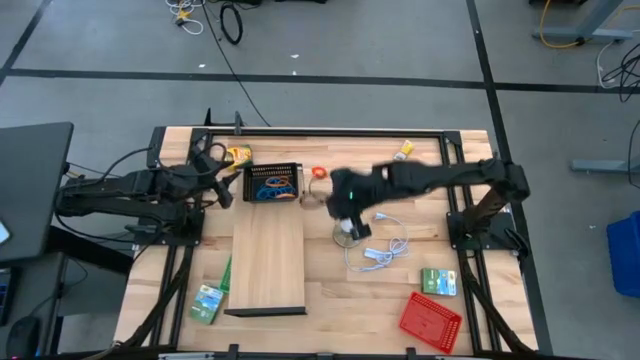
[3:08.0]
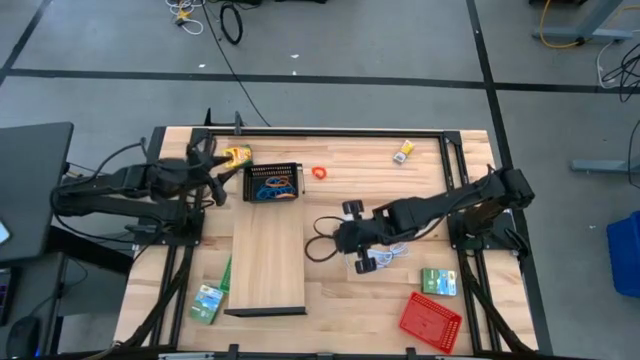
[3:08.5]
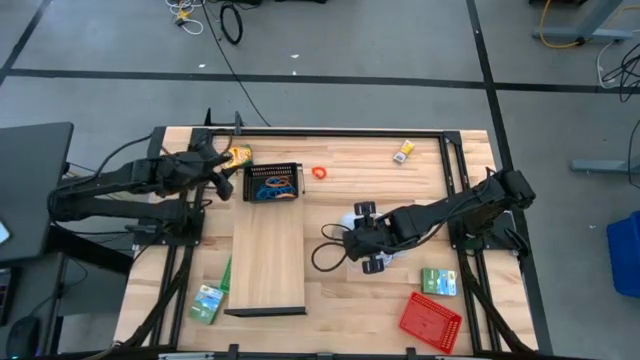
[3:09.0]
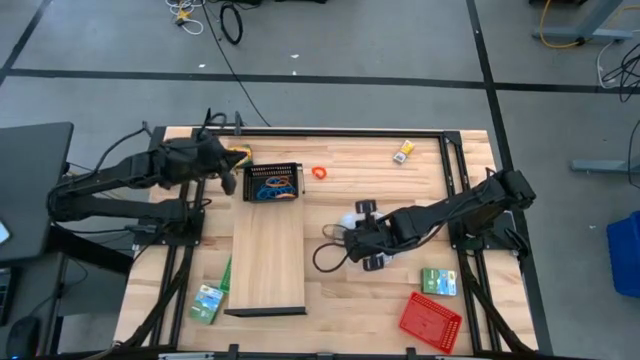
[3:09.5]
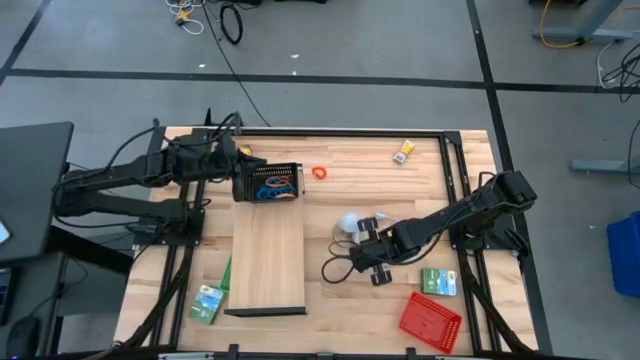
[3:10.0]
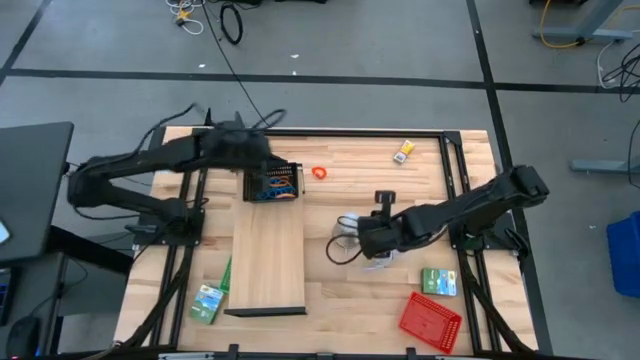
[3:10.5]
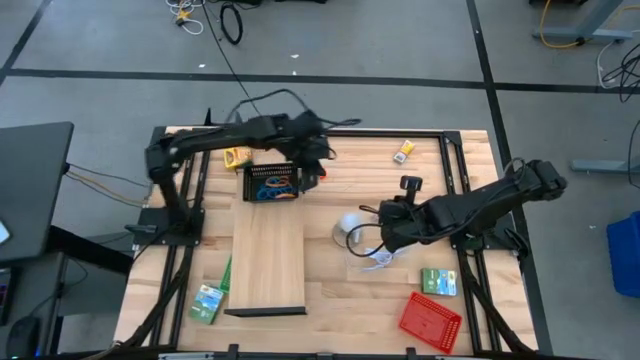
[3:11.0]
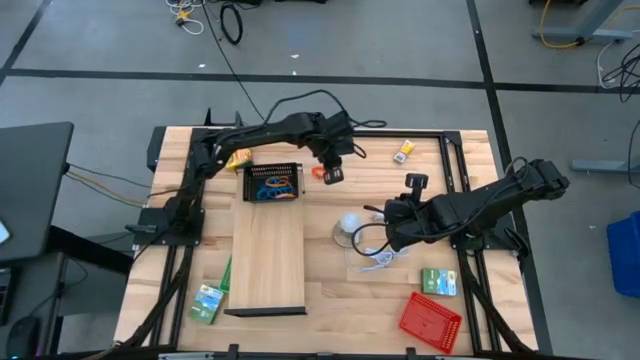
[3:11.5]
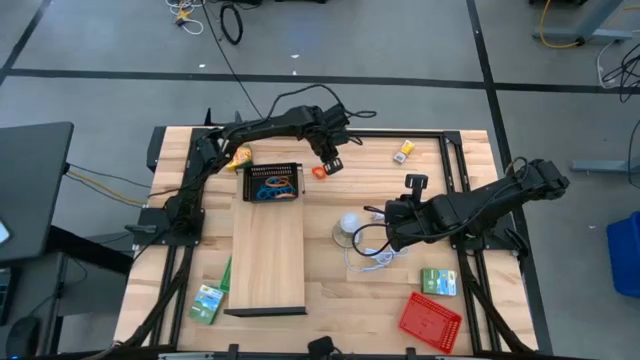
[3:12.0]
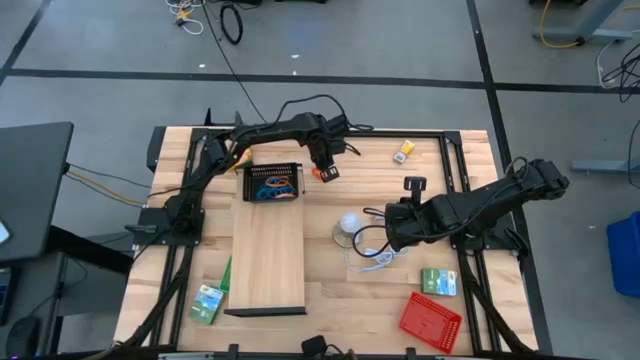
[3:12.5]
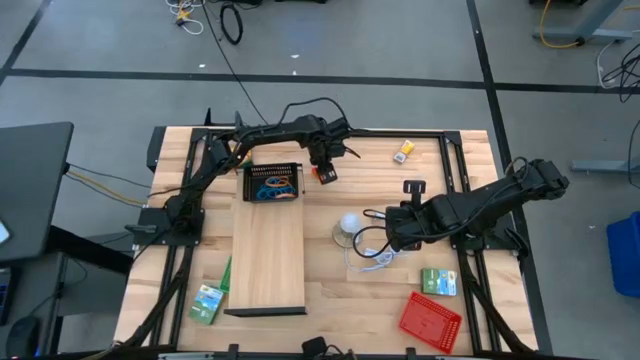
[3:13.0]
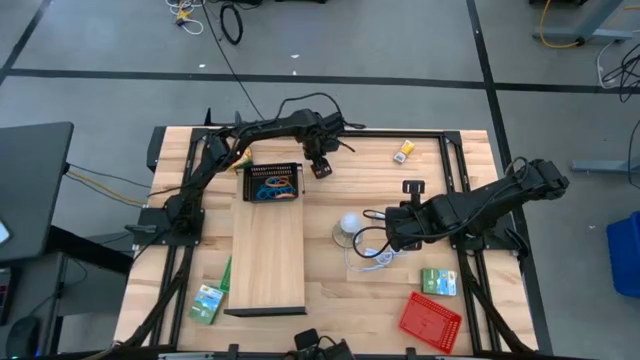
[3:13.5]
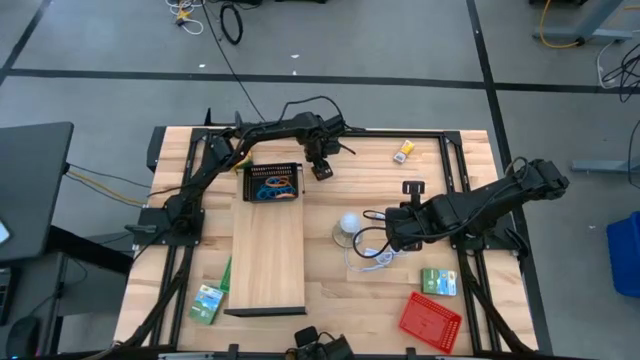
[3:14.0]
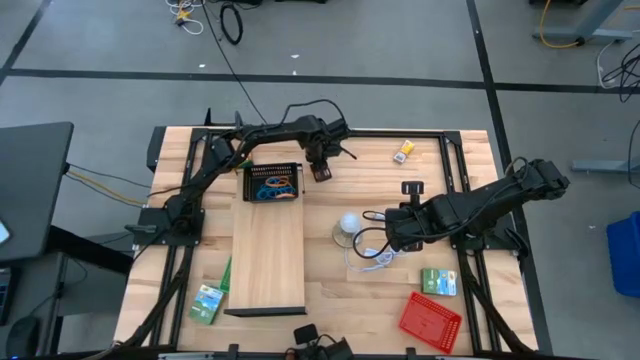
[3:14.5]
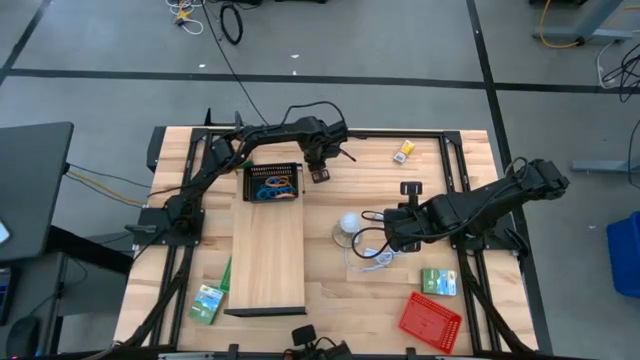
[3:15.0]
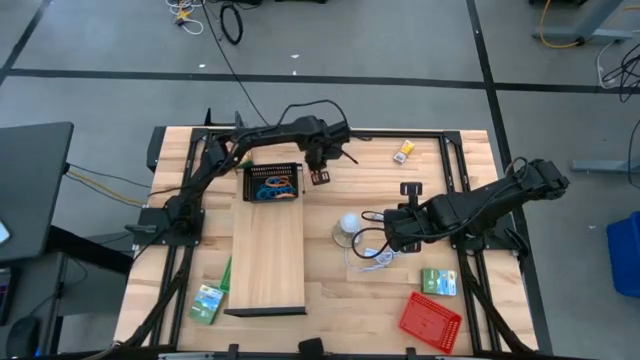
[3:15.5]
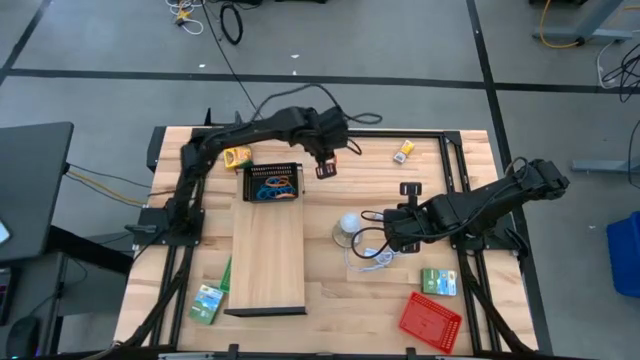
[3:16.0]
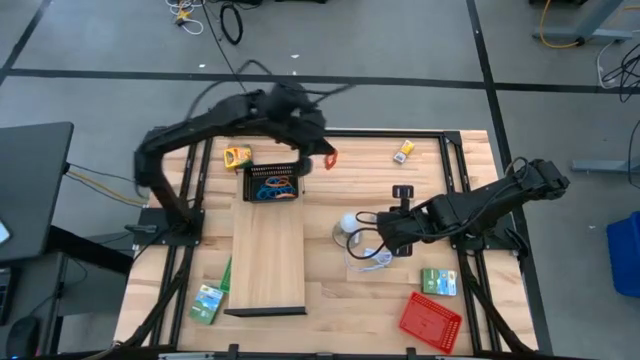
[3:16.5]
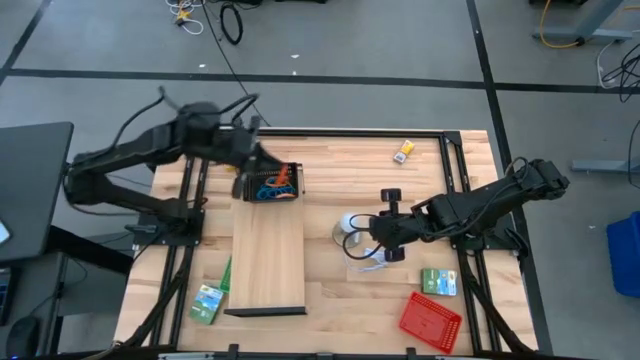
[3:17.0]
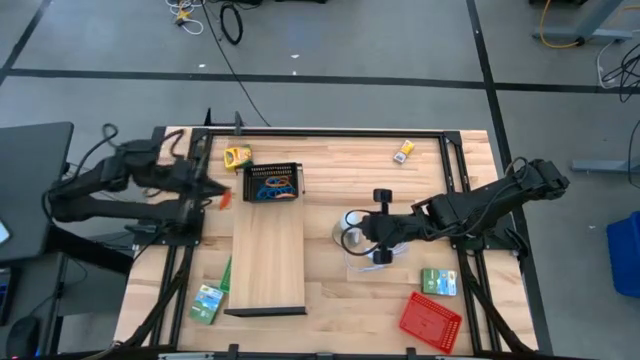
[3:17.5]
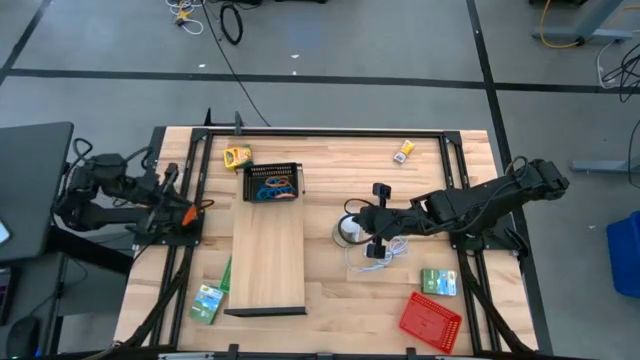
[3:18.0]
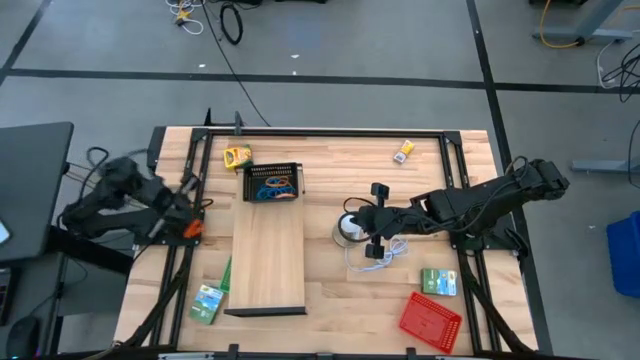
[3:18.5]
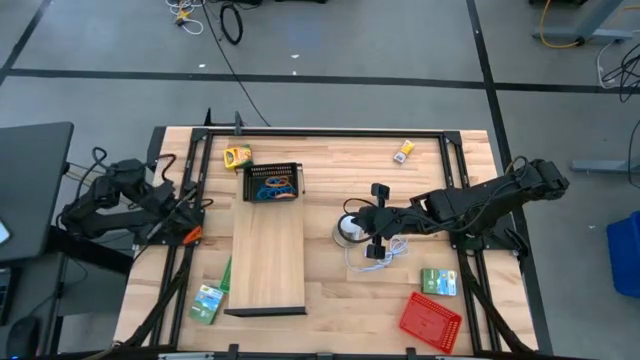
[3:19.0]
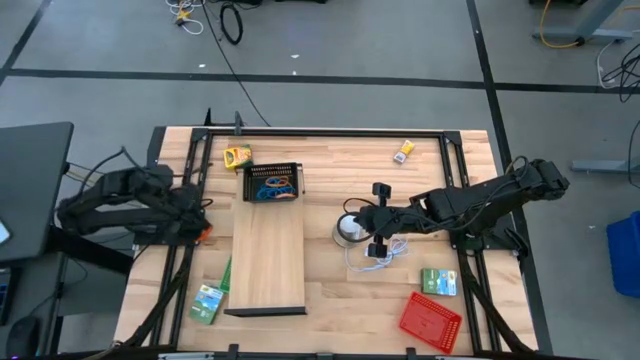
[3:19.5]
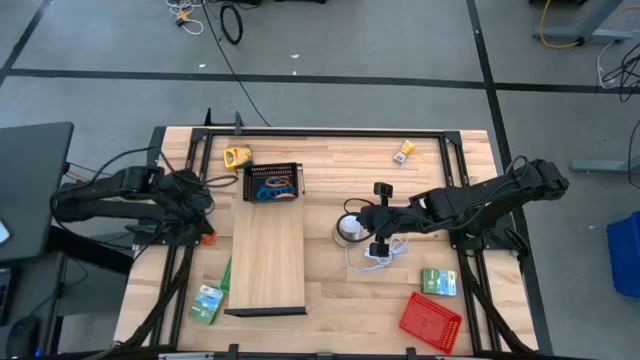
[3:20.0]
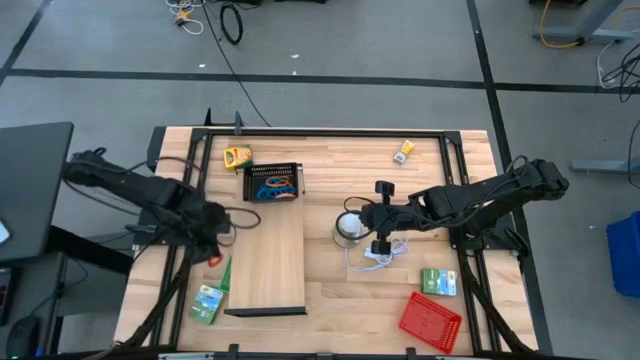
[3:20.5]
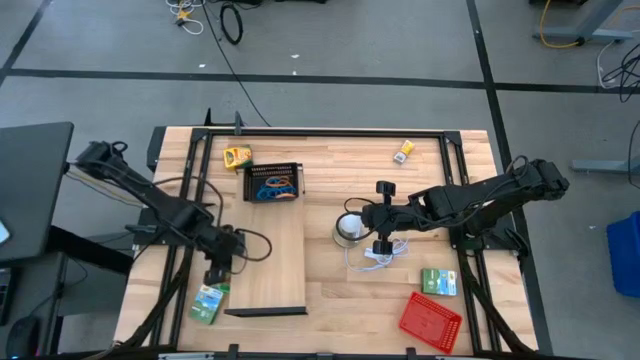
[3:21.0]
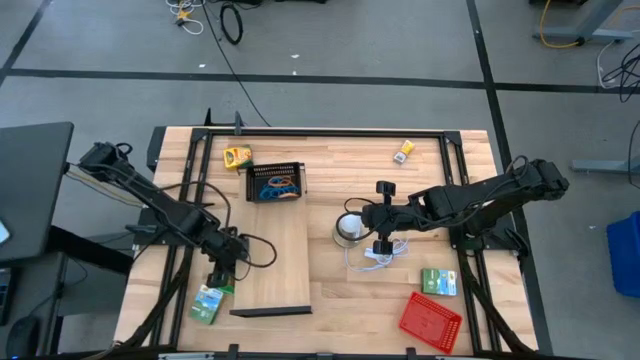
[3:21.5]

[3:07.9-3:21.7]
Task: Pick & Place Office Desk Supplies
Put the orange spiral keychain into the green bin

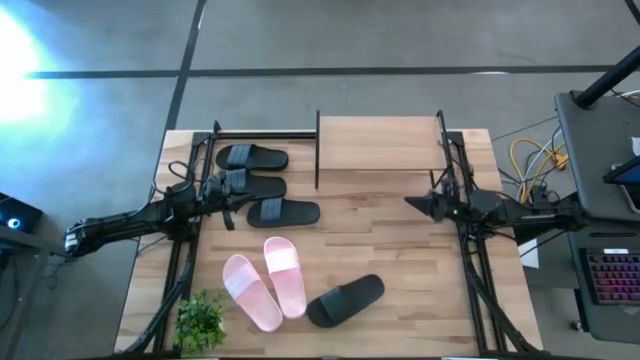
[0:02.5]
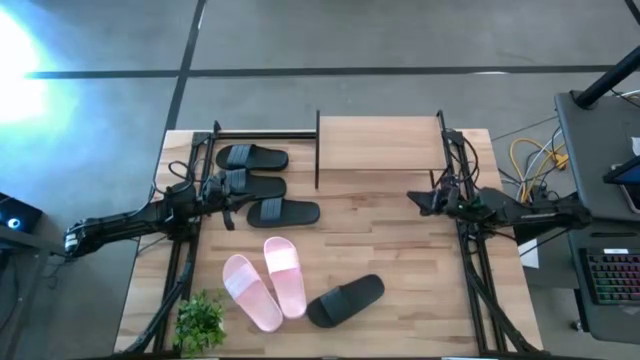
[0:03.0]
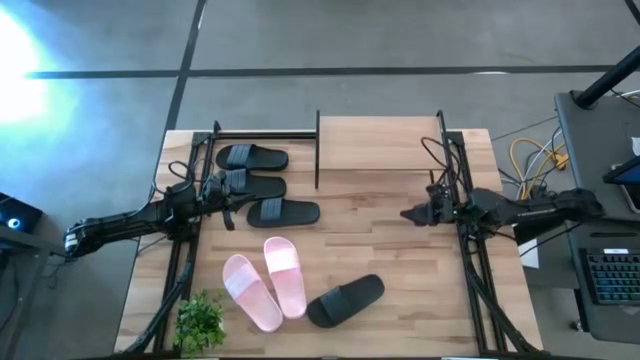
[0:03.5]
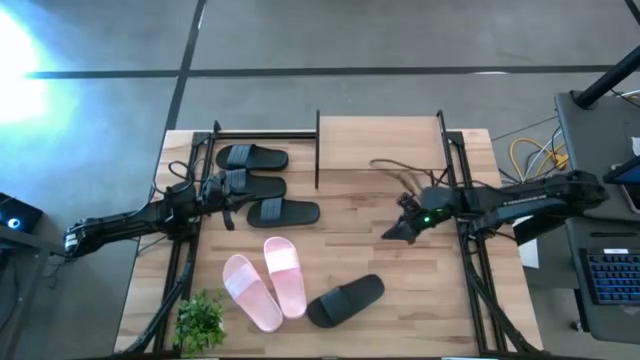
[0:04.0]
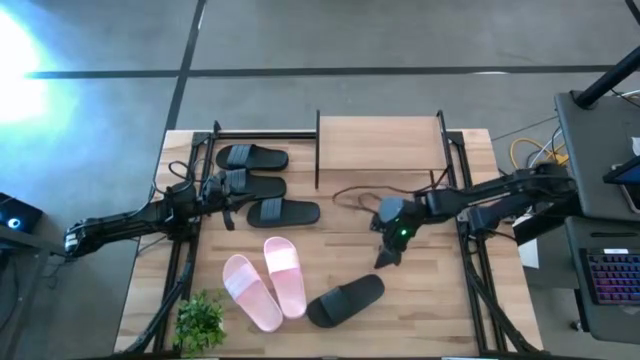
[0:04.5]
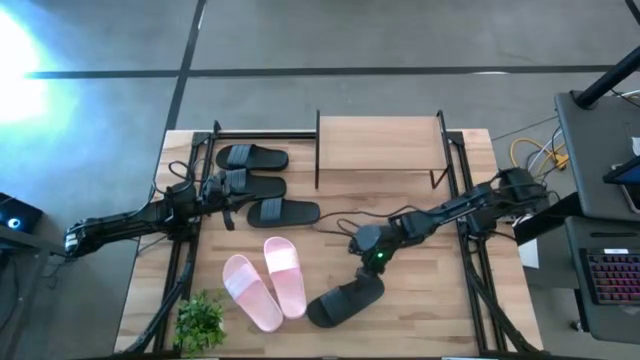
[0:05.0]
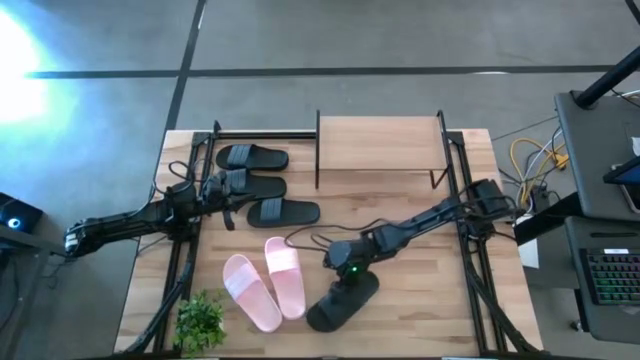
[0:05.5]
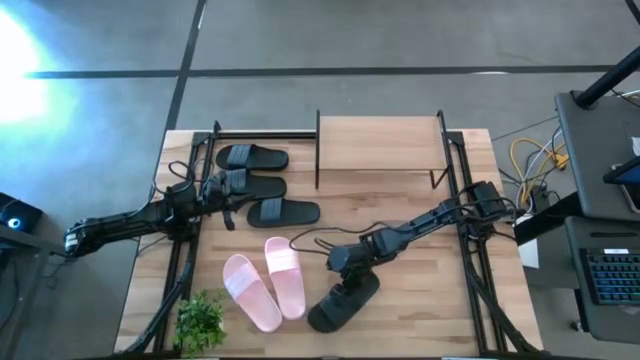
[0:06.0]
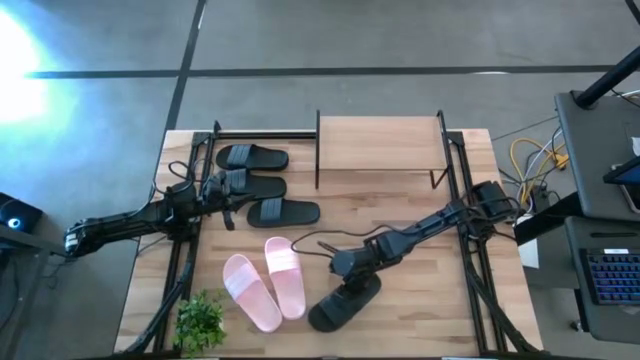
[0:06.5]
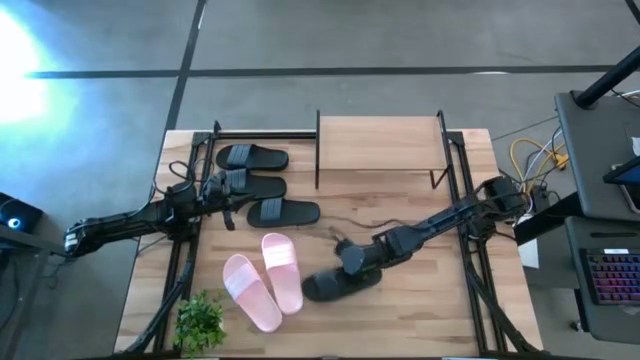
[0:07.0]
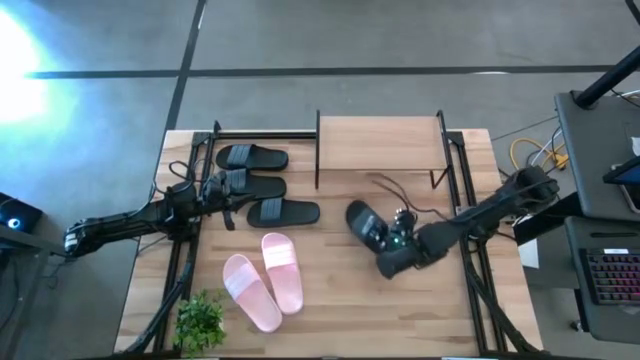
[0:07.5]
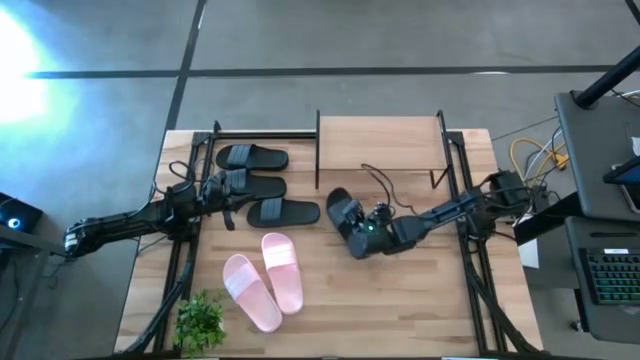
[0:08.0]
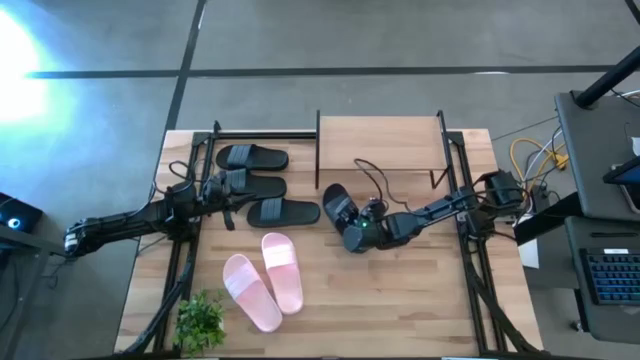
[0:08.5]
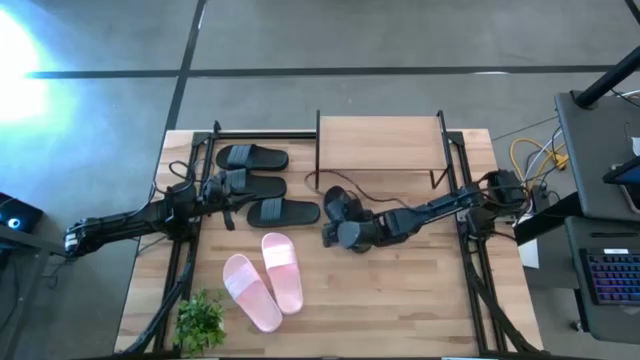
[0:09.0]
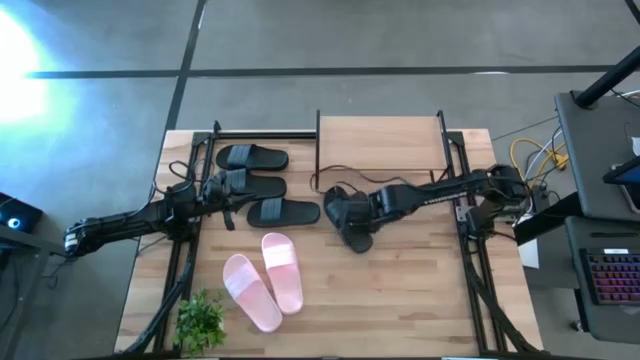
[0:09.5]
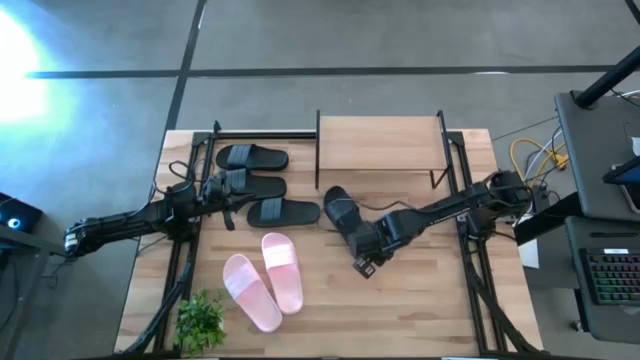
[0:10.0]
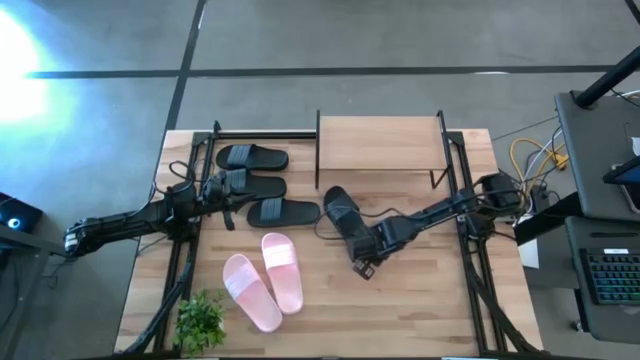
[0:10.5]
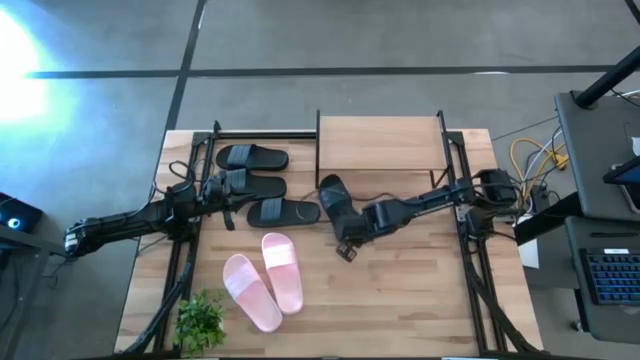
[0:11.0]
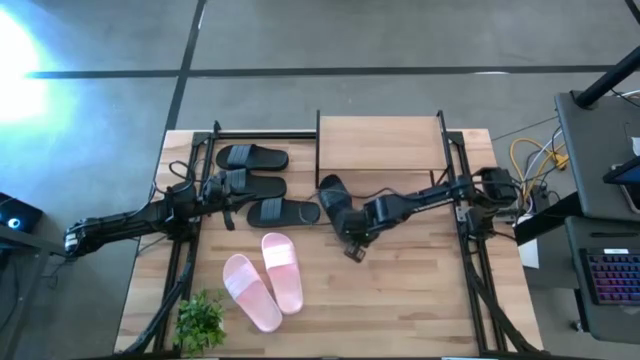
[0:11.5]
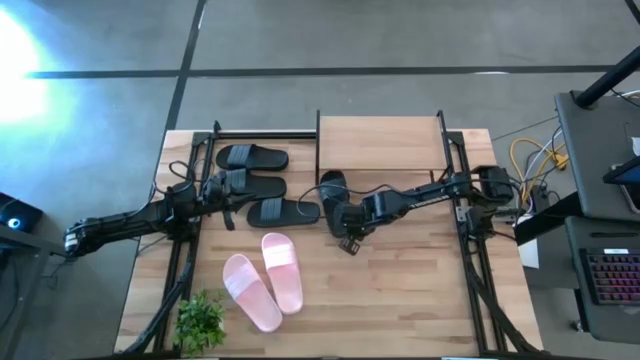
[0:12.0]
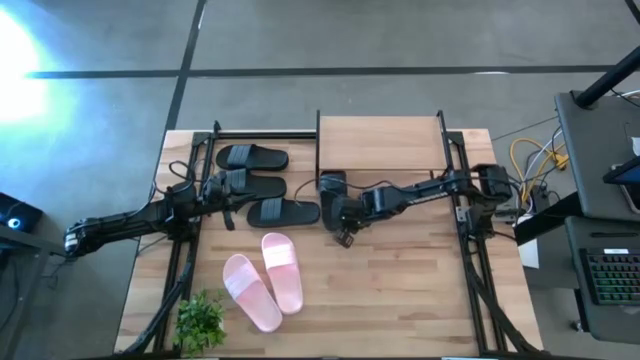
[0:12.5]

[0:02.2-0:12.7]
Task: Pick and place slides into the shelf
Stock the slides on and under the shelf
